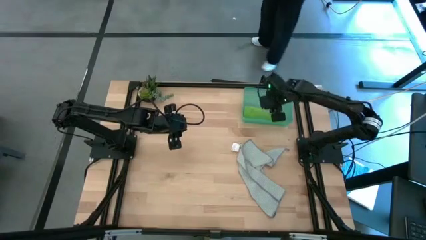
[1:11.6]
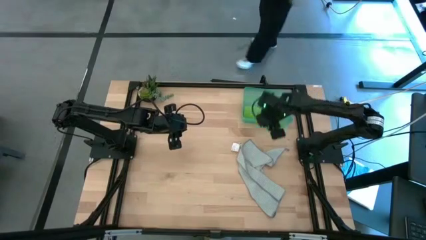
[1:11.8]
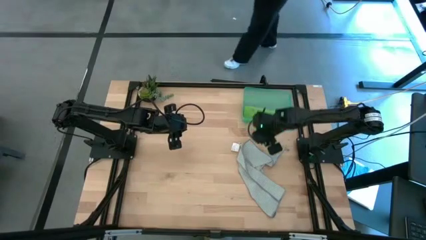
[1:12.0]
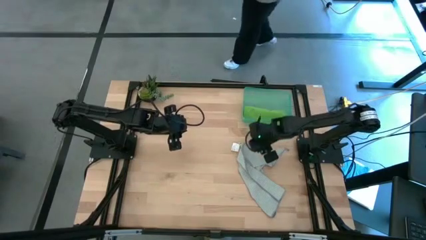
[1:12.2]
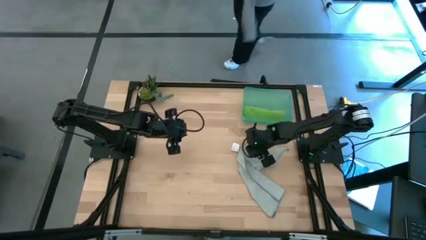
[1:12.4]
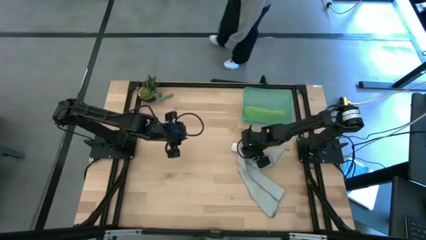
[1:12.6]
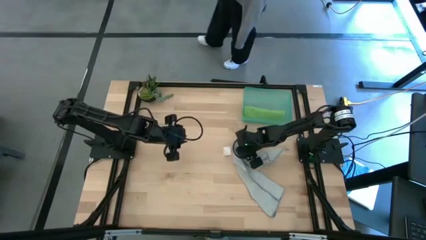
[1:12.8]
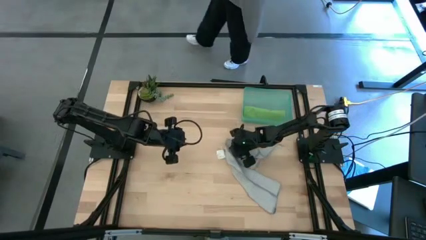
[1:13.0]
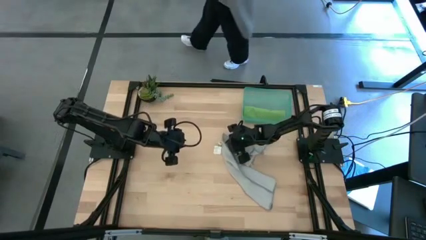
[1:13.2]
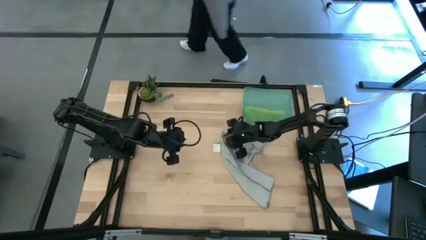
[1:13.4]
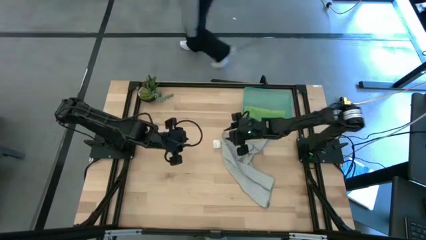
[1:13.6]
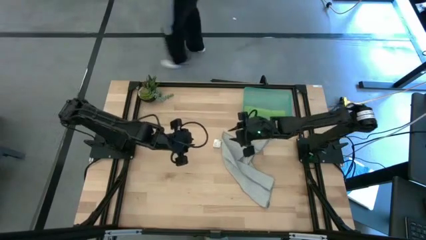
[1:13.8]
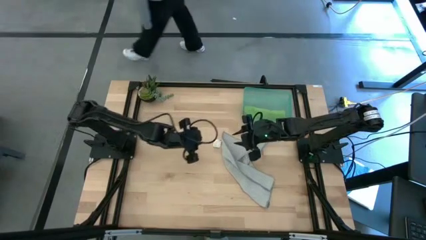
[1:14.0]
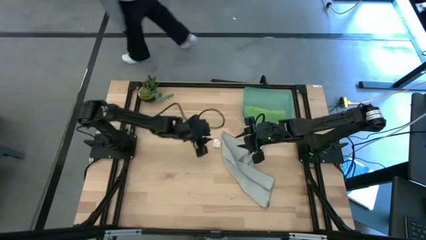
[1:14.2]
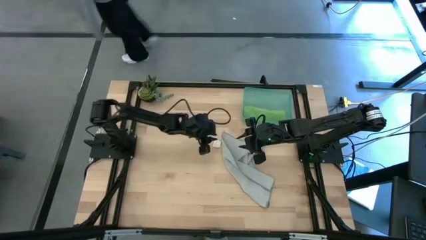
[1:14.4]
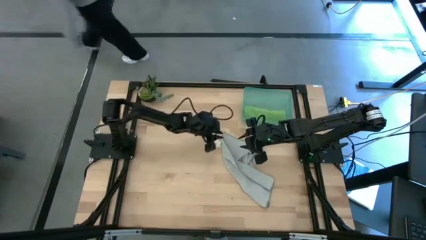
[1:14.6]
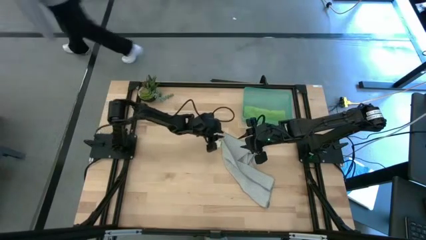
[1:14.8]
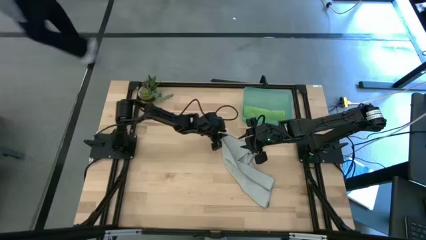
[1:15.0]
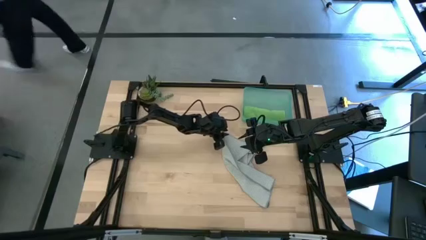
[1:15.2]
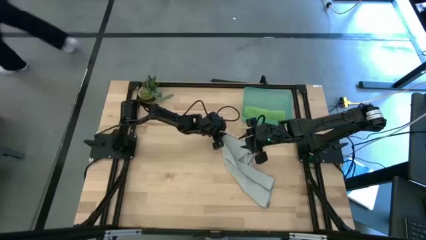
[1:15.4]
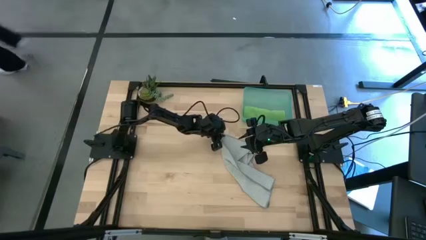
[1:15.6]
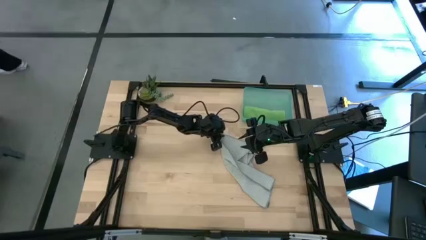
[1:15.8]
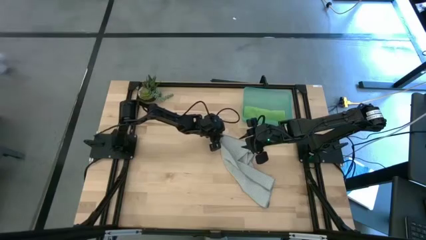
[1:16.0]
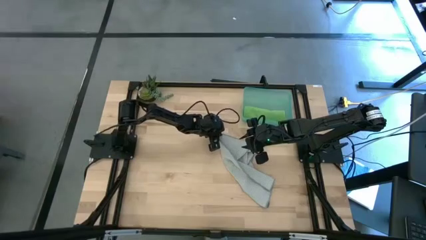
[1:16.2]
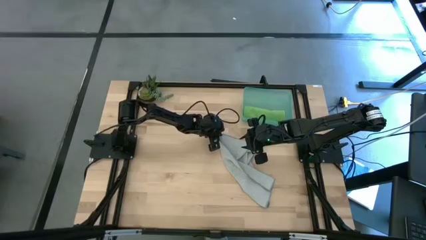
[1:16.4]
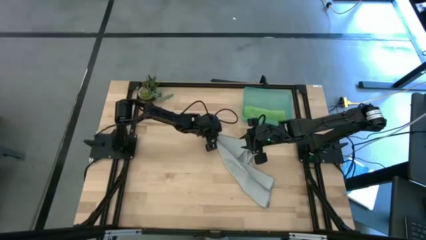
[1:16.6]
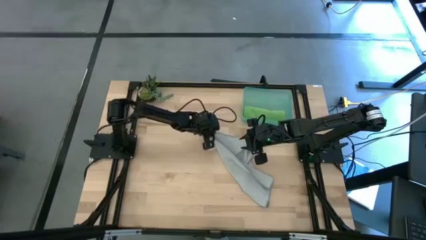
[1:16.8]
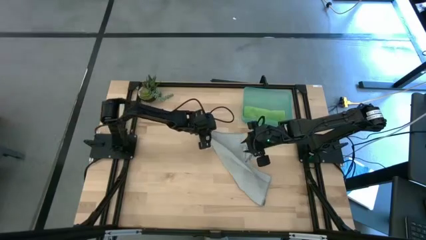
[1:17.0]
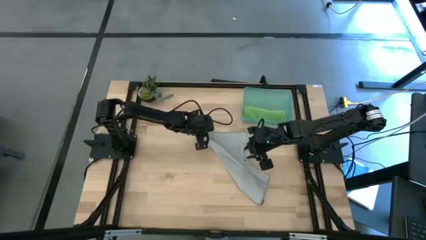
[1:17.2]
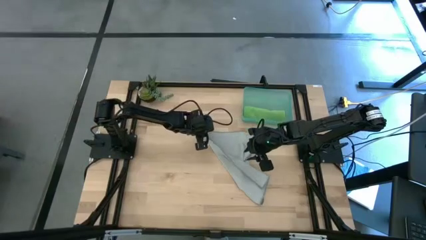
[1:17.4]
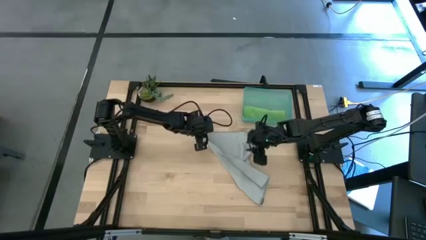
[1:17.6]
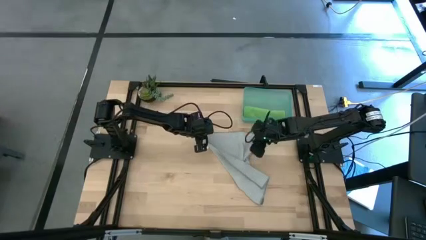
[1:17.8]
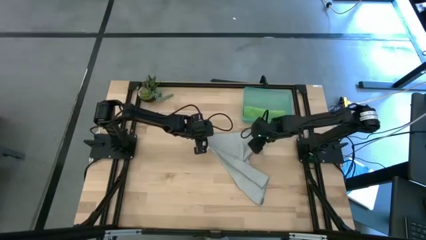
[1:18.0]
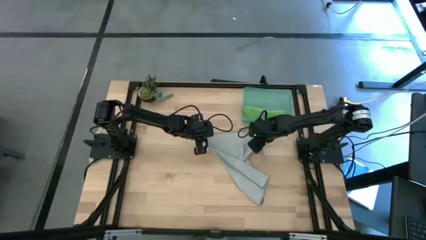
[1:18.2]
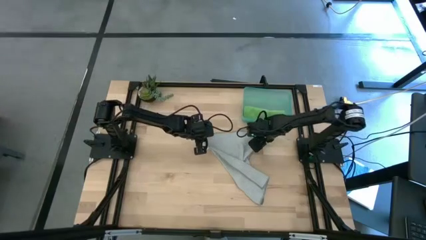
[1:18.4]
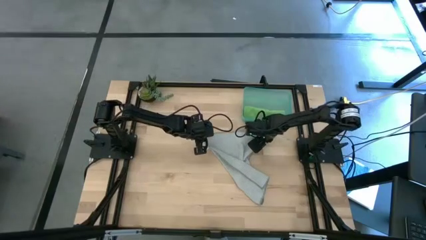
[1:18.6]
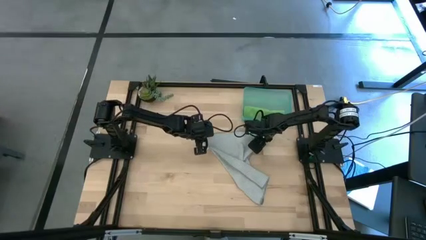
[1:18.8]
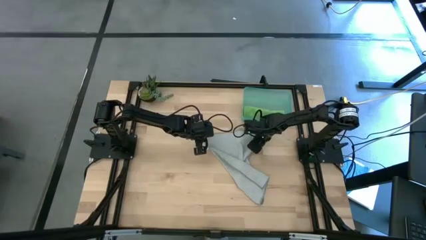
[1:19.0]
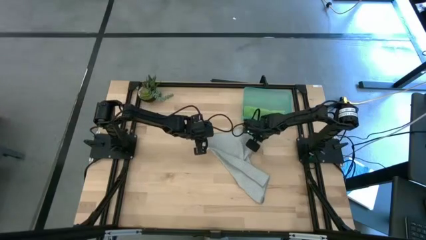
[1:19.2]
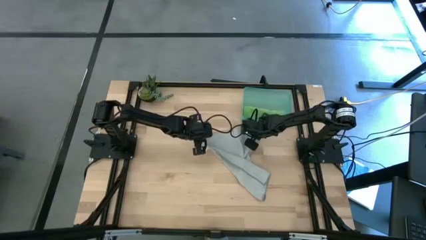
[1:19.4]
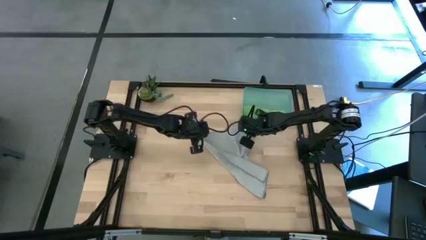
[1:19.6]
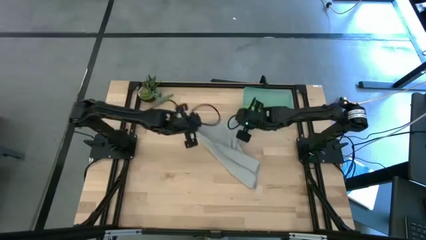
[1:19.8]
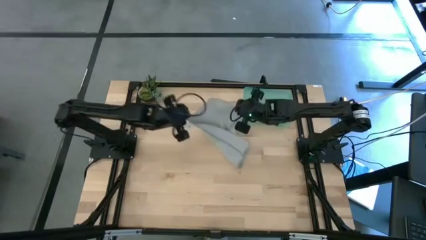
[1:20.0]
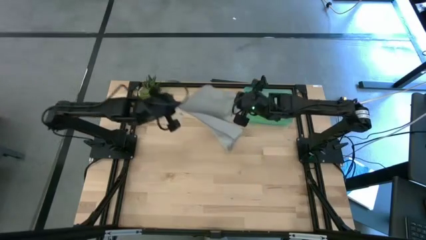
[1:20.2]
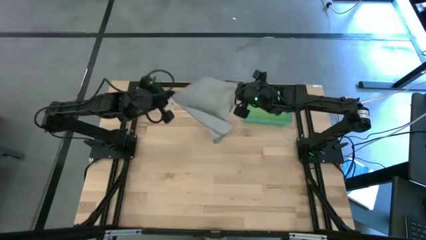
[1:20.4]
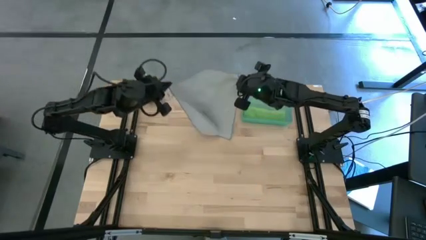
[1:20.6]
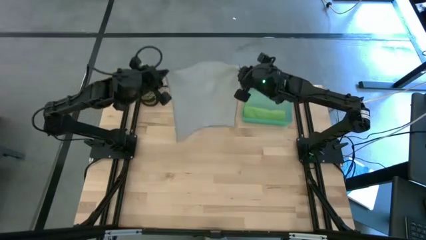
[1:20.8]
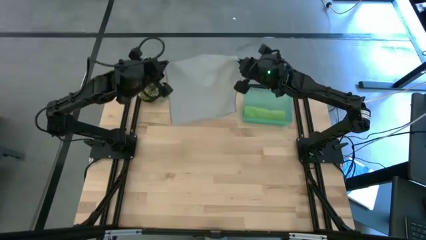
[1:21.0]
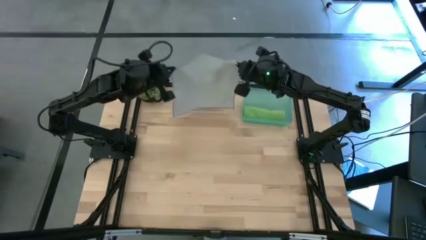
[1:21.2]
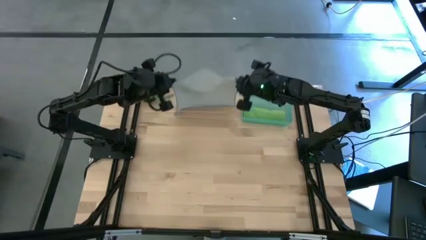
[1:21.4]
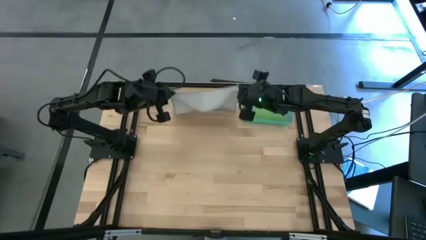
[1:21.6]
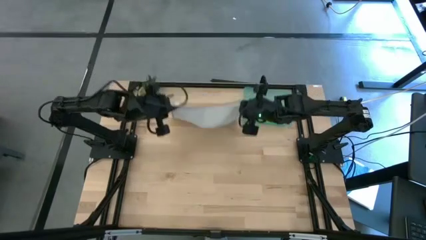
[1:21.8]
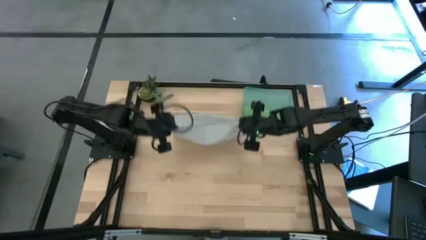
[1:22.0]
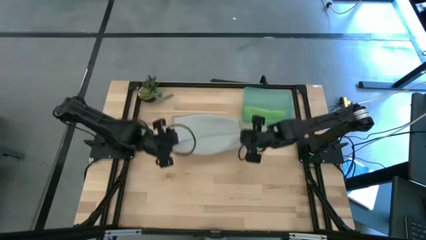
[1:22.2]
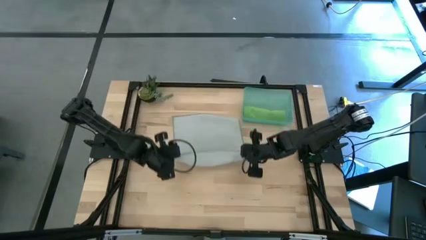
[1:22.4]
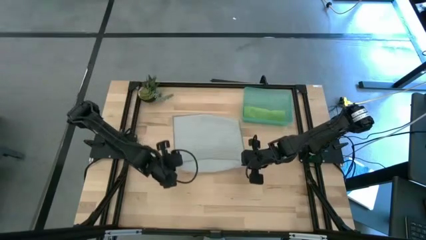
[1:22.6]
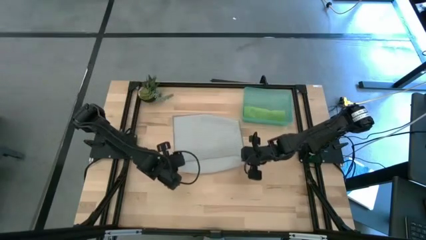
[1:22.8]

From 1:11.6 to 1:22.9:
Task: Roll microfiber towels into tight, uniform cylinder then place into a basket
Fold the gray kitchen towel
